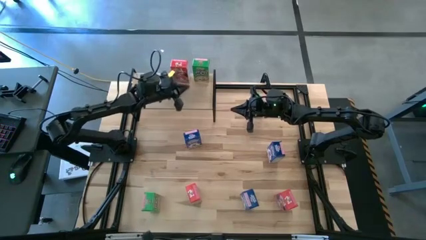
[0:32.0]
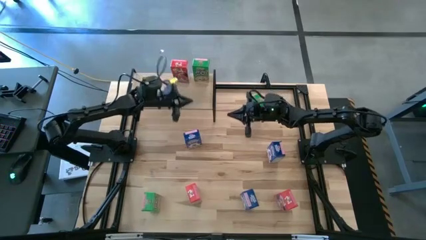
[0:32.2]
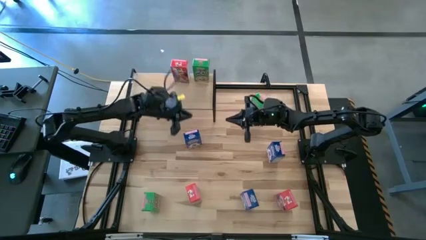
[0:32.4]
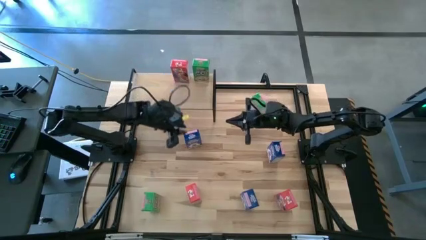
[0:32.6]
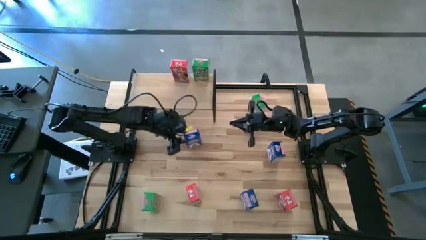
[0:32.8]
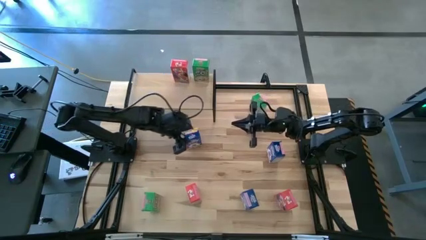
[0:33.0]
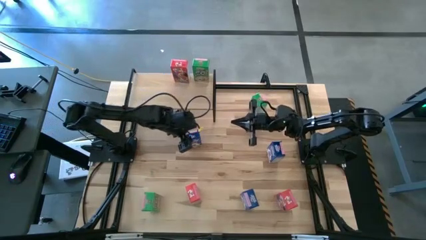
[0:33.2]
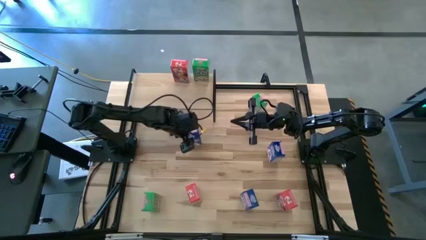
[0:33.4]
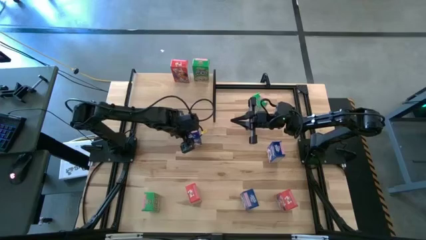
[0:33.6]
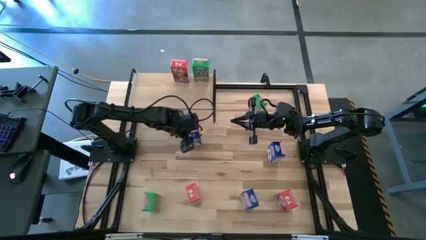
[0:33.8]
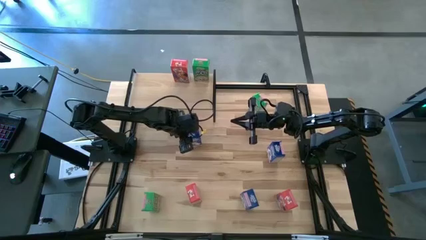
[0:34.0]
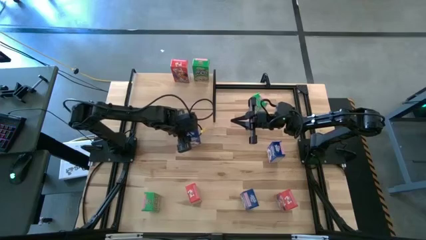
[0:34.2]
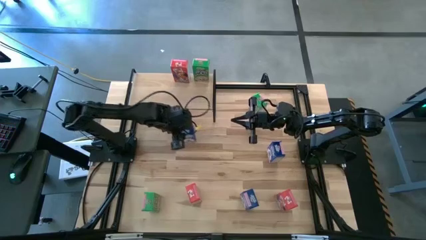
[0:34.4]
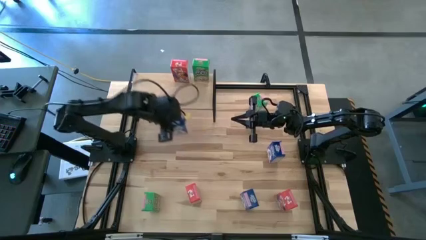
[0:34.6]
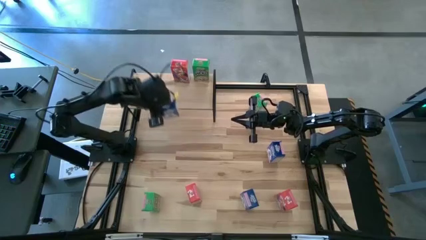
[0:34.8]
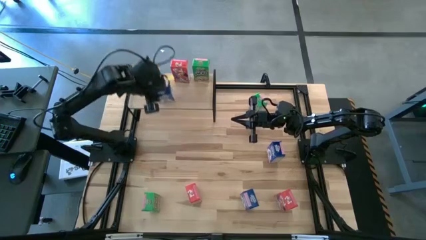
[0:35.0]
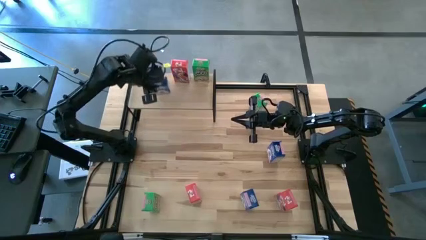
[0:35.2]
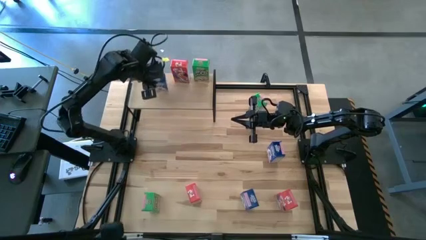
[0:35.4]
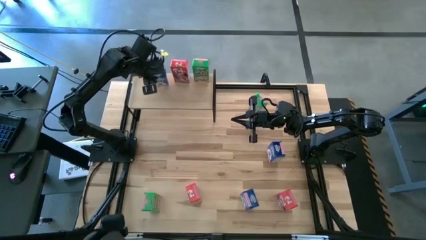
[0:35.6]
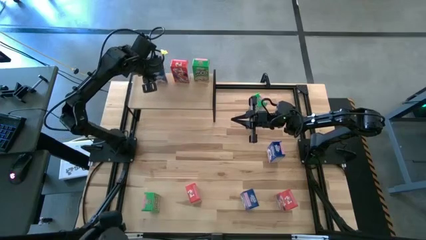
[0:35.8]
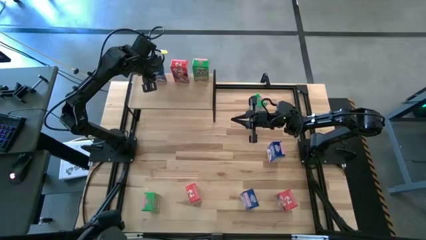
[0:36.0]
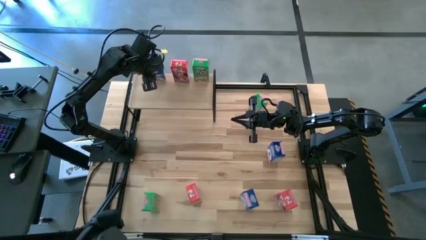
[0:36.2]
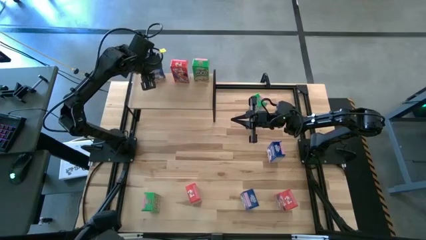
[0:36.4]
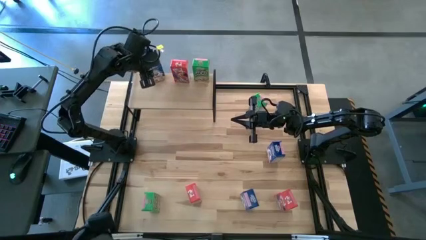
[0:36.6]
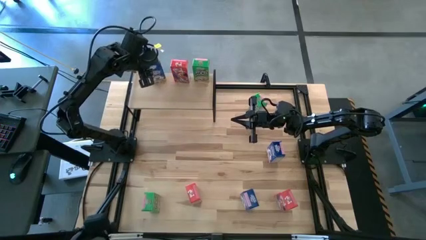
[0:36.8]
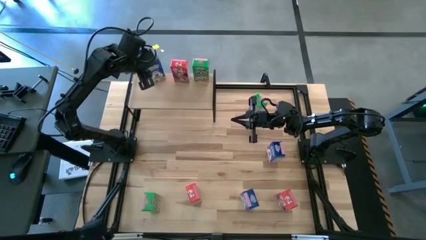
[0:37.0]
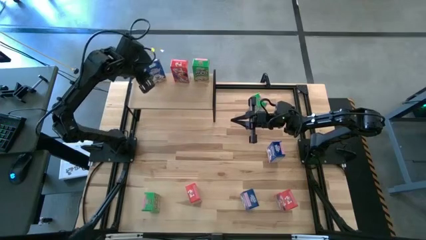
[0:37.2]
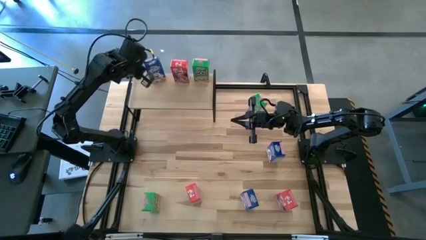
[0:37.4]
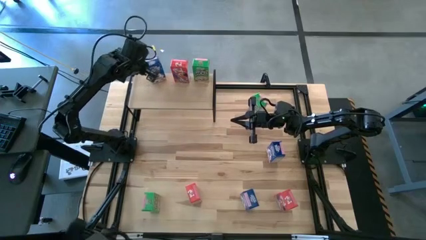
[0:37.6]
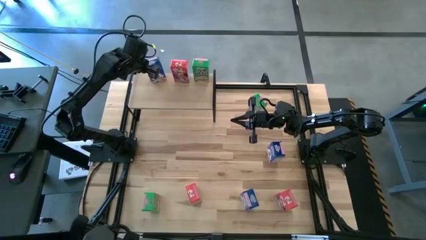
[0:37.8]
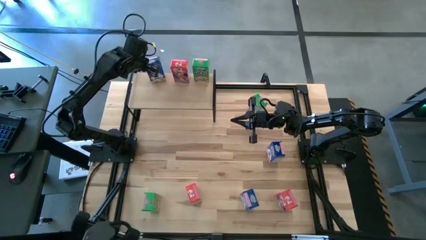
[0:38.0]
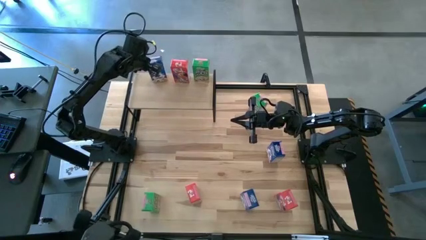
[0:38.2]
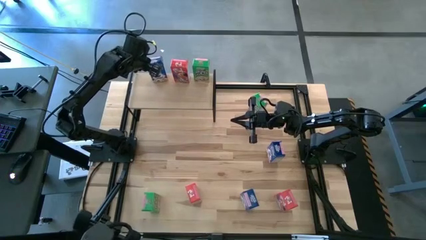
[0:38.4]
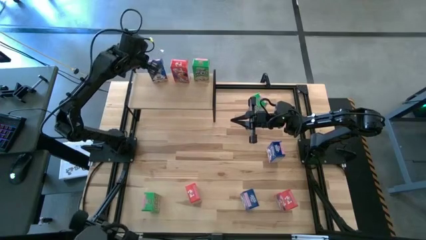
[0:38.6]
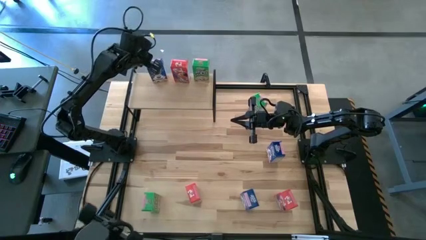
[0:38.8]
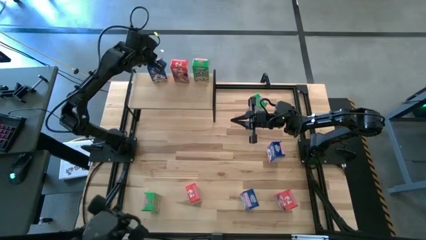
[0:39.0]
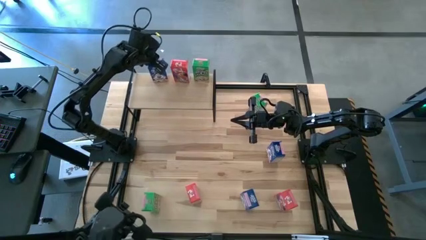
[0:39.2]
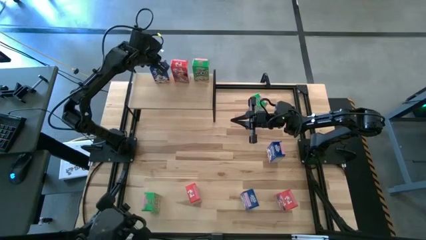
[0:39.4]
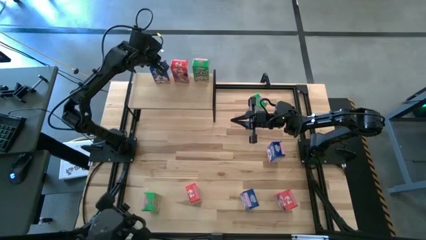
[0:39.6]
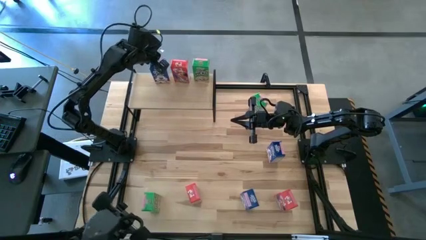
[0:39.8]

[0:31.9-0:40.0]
Task: Stack cereal on shelf
Put the left blue cereal box on the shelf

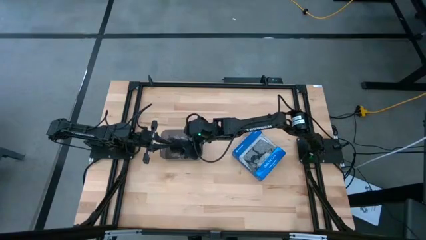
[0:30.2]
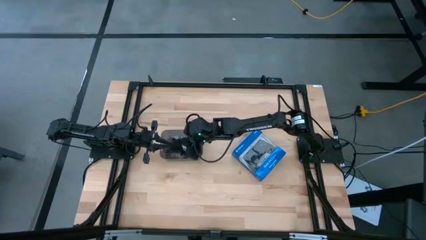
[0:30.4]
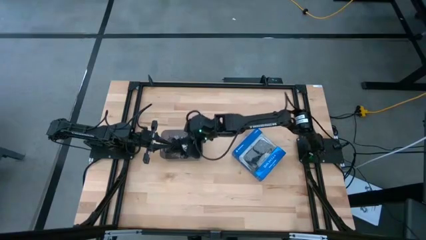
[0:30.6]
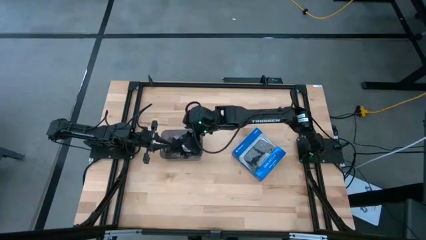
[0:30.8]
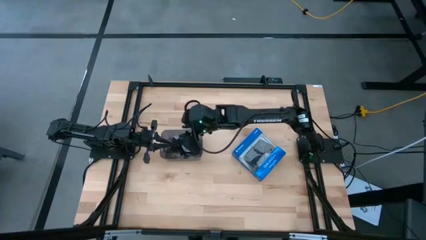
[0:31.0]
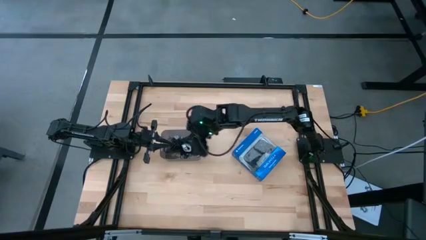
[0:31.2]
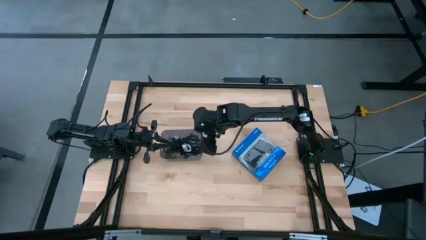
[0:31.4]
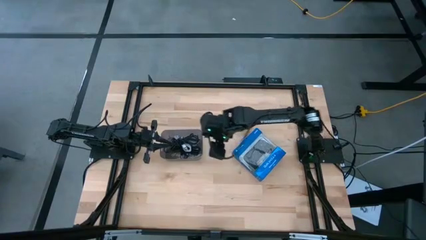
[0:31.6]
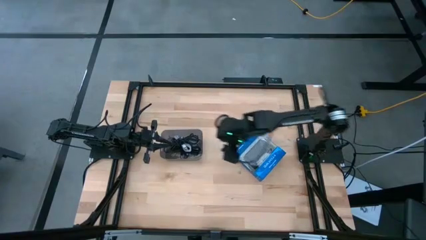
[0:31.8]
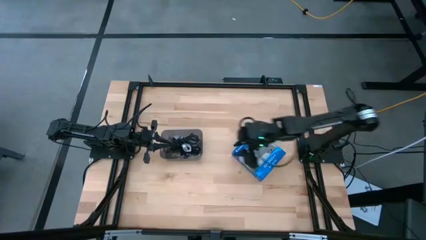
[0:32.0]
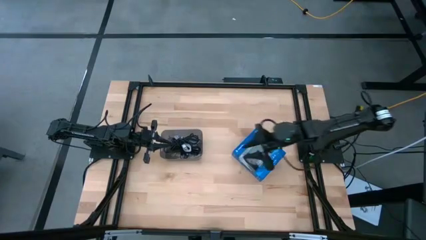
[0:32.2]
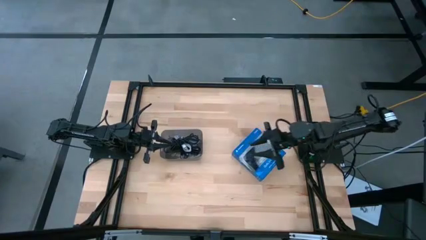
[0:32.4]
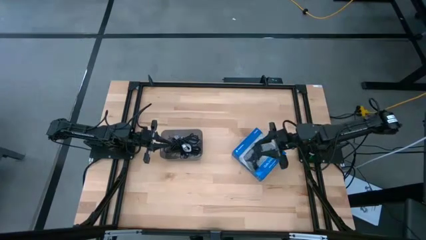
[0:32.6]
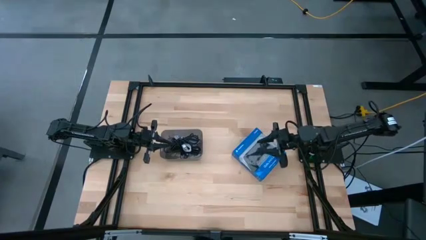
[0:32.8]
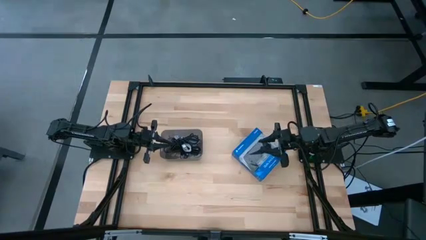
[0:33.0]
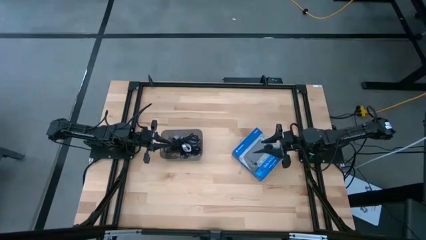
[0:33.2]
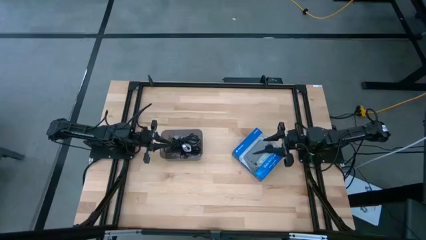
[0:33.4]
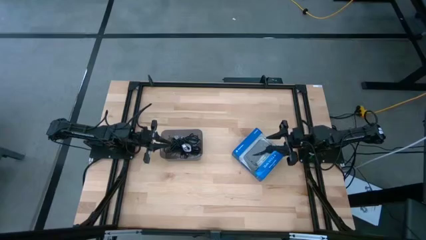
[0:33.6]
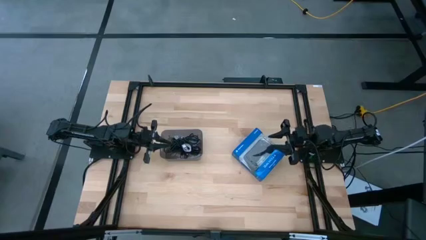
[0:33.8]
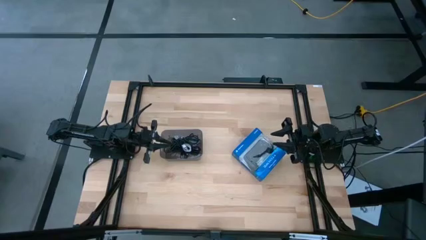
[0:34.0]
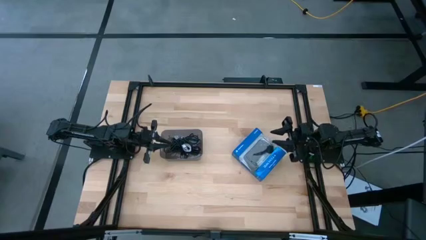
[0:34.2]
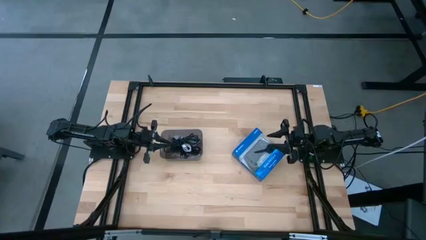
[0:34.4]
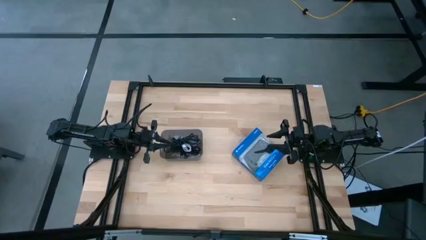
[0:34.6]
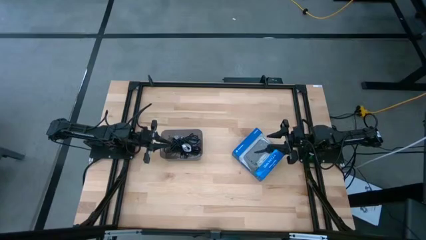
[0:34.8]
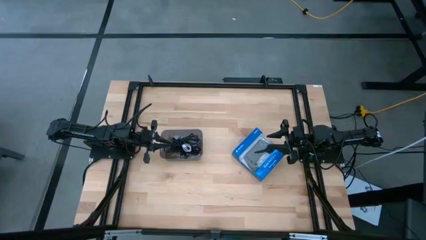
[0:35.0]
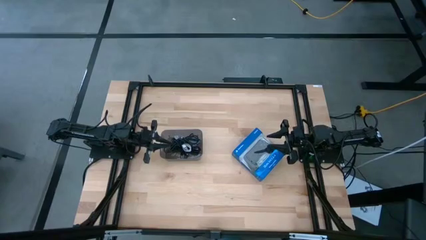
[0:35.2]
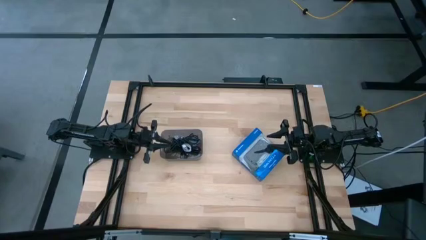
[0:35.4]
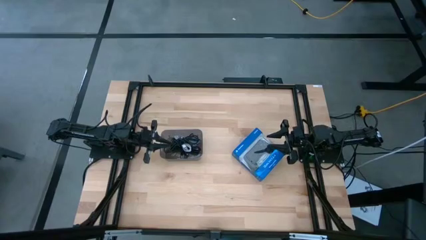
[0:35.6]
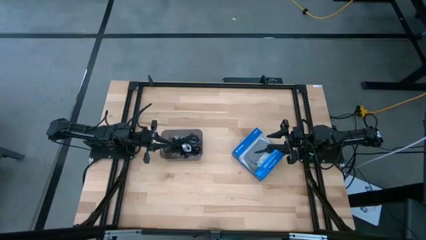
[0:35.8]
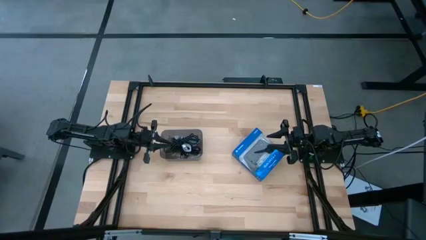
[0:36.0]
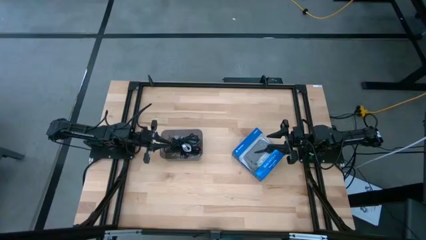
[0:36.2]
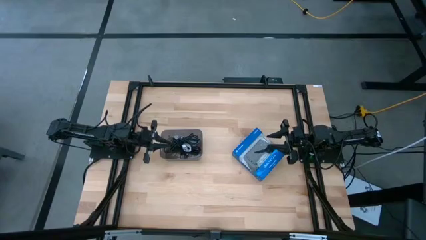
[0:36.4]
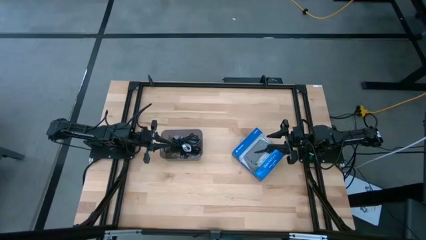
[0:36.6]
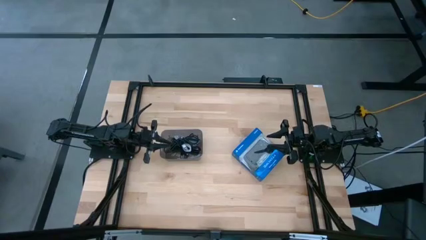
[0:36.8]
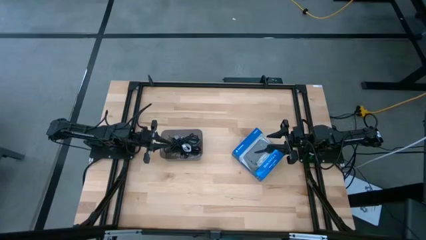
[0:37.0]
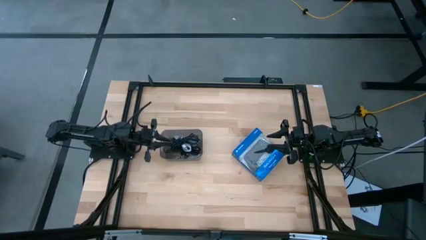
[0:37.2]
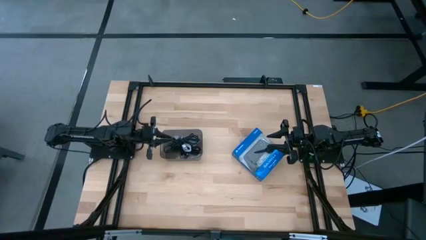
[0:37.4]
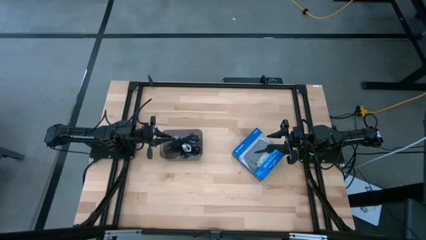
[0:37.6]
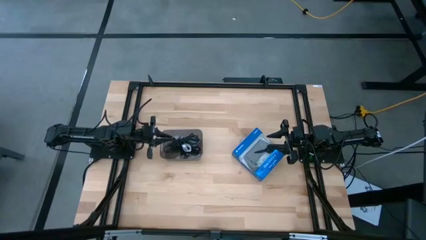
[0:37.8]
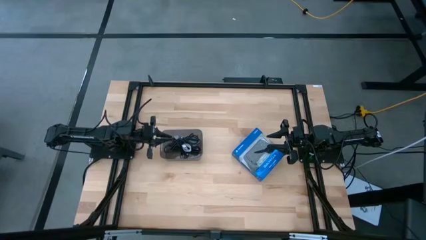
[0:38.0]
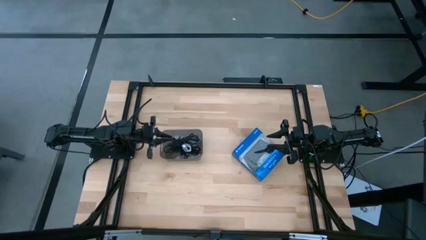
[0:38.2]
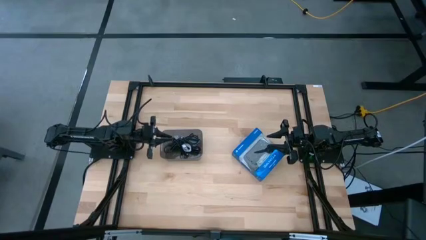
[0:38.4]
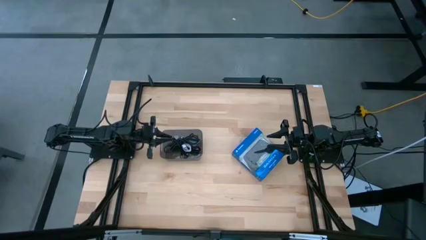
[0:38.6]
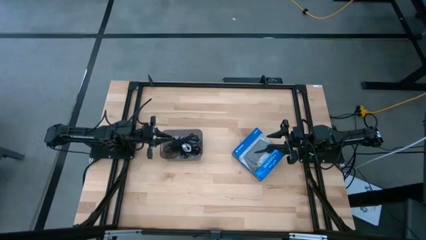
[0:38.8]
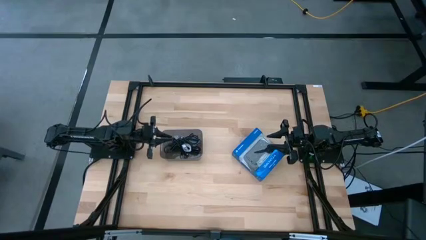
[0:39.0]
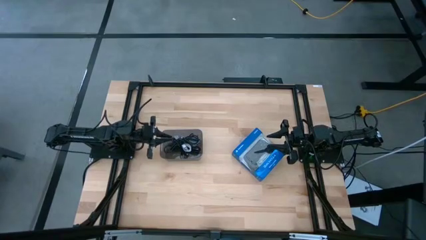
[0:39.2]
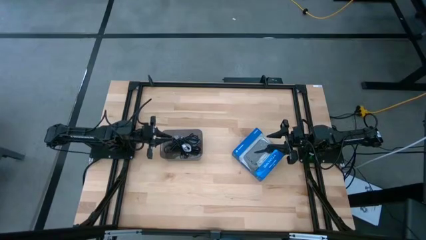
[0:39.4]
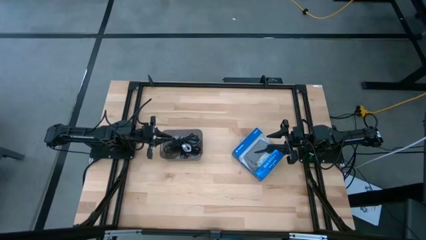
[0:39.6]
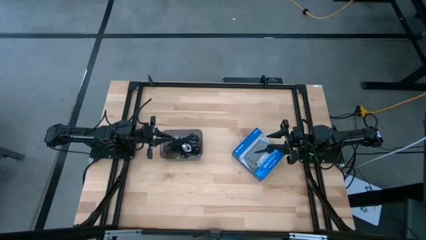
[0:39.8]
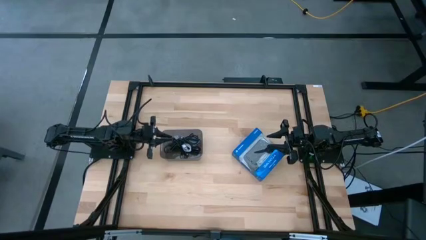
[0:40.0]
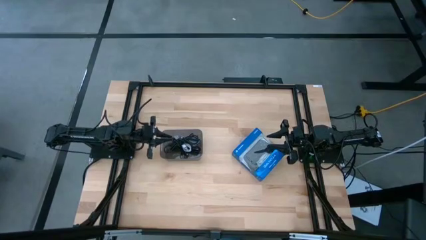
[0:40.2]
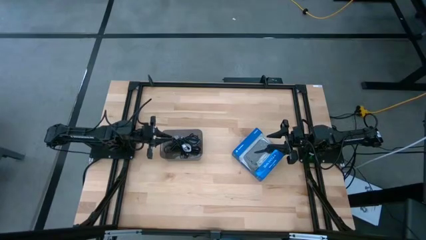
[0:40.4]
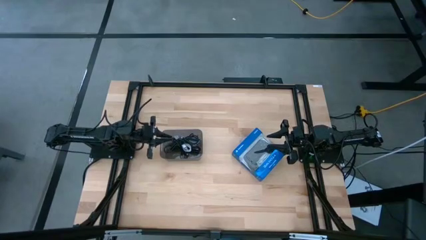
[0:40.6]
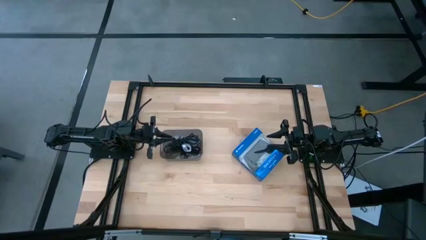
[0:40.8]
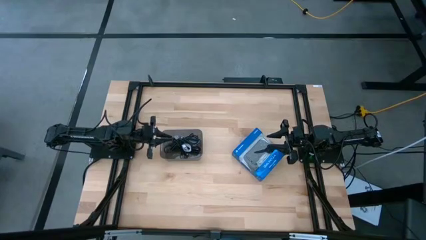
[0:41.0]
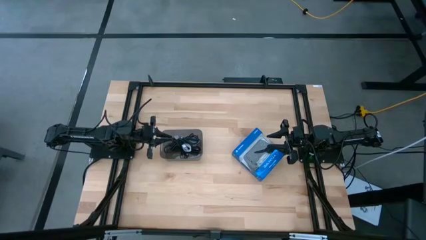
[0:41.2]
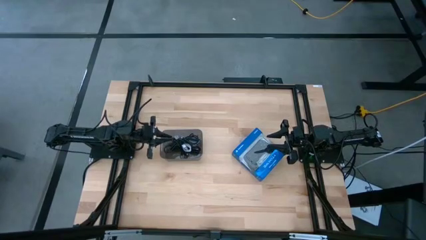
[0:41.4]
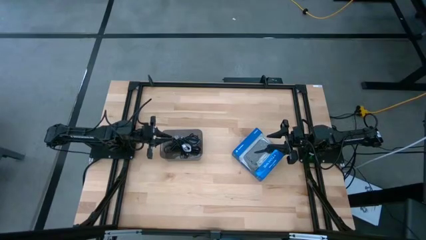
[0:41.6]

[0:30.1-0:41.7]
Task: Pick and place USB-C Cables
Return to Home Position
